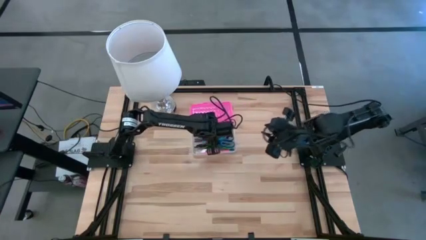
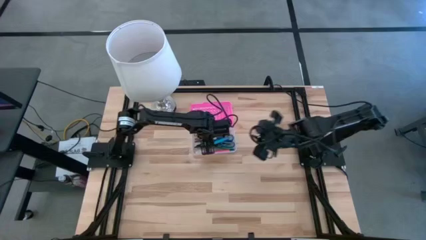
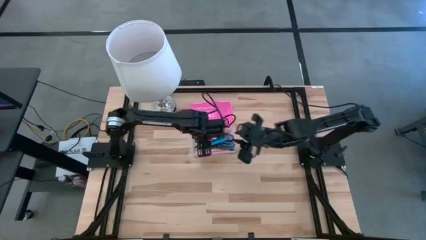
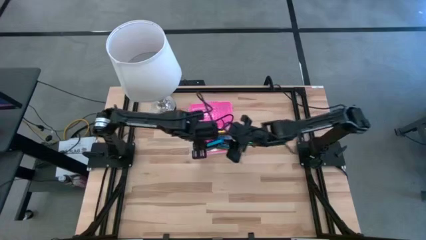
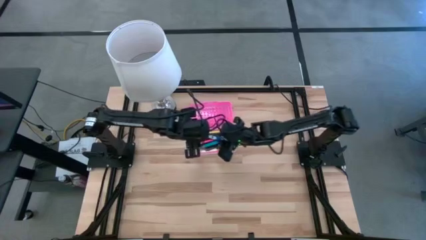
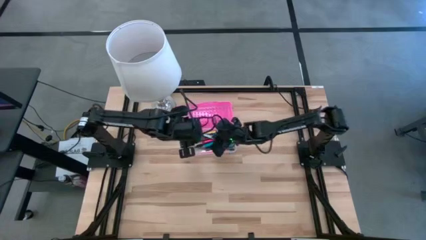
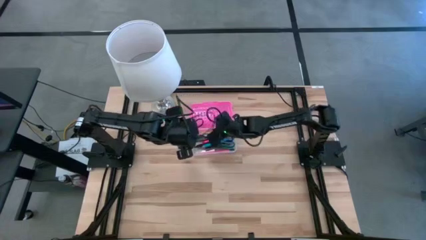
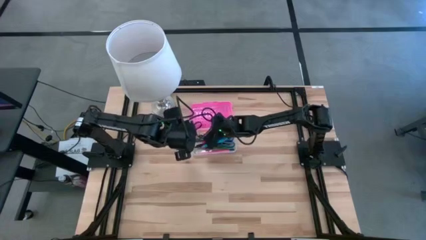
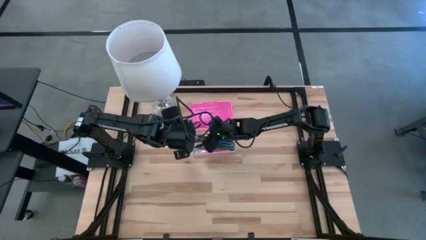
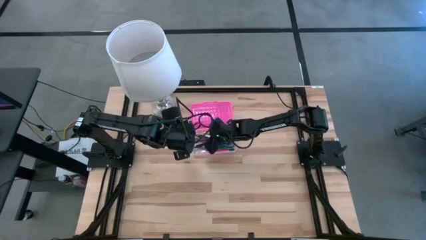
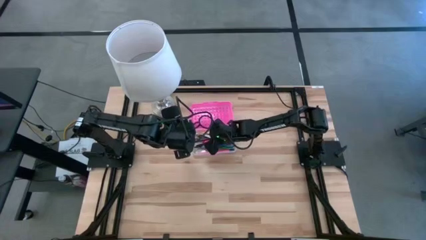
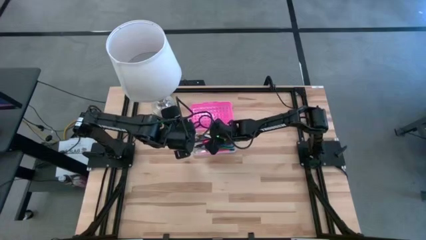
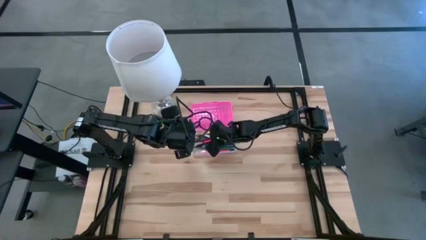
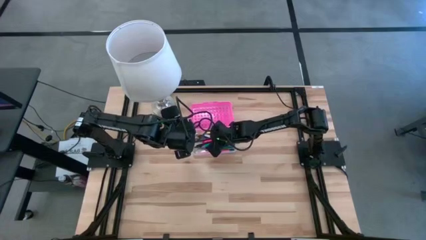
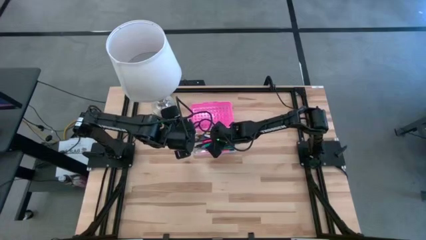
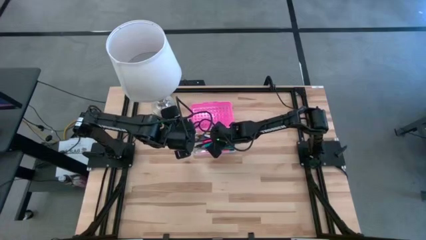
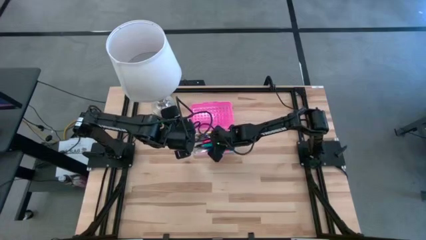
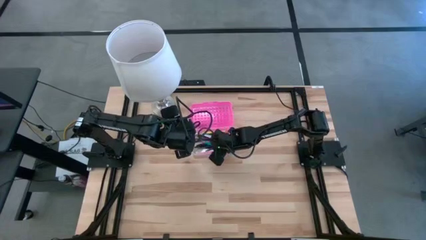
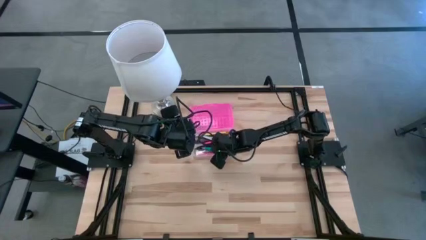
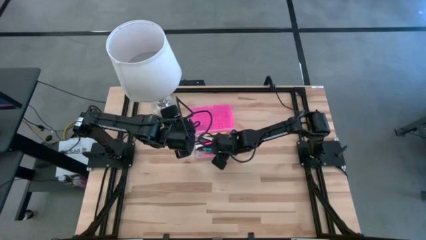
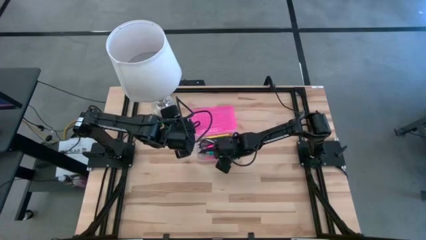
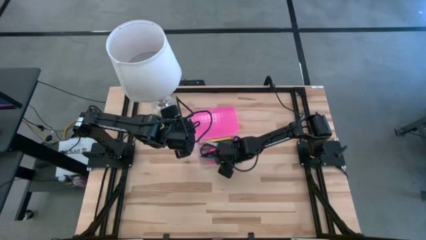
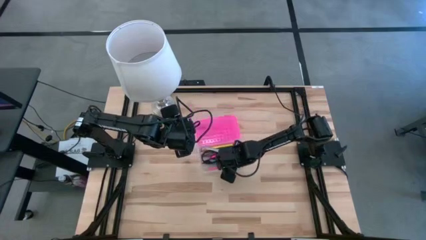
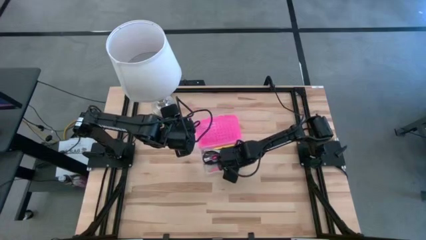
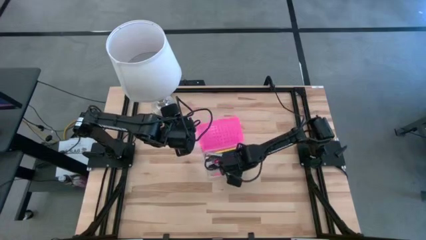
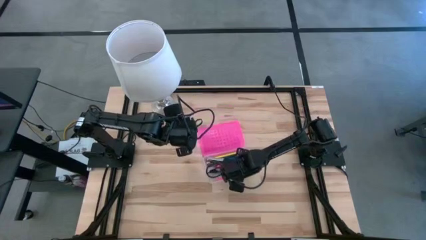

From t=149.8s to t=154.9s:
Task: Pick & place school supplies into a supply box
Move the supply box to the center of the table

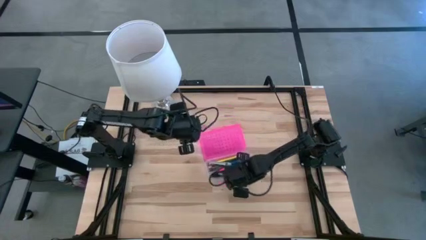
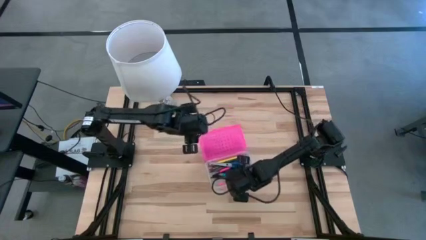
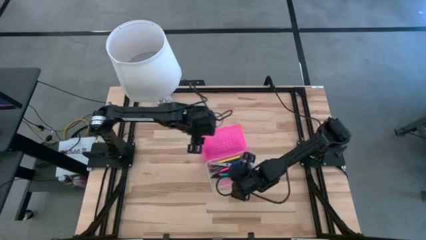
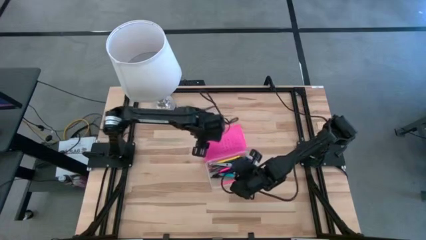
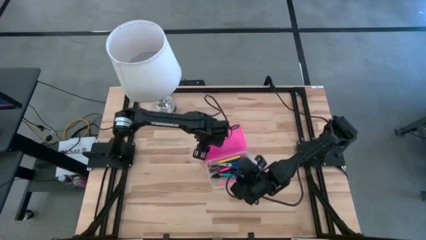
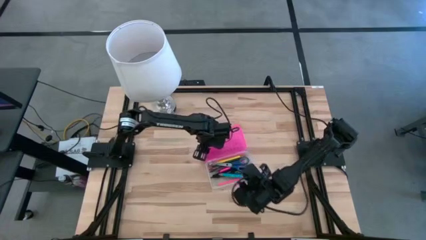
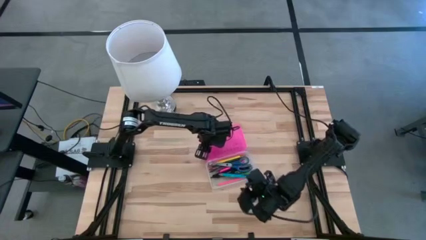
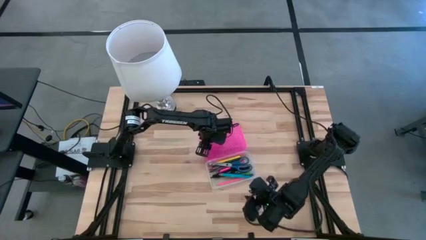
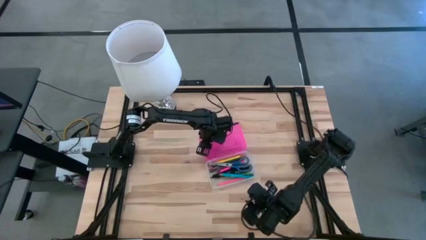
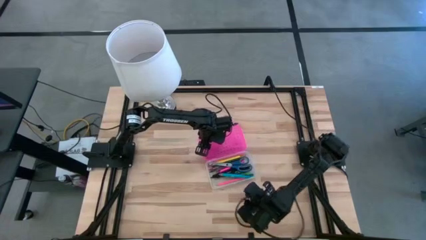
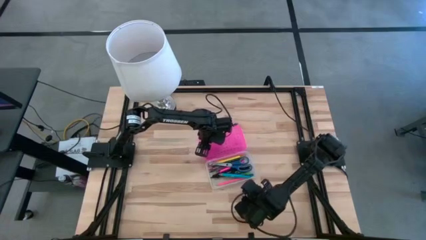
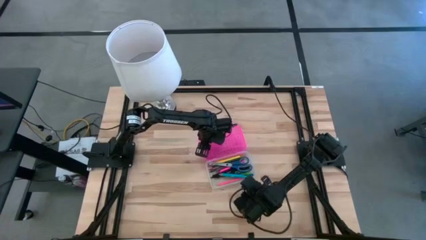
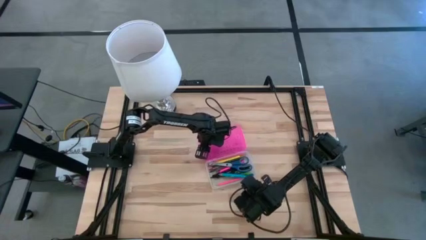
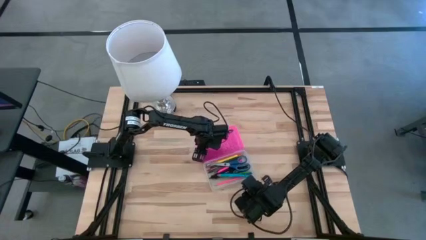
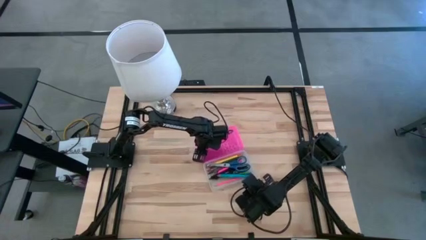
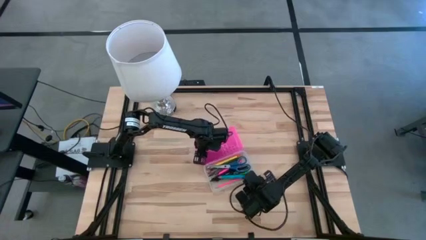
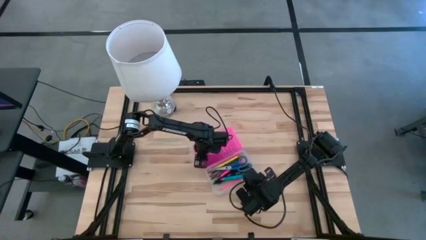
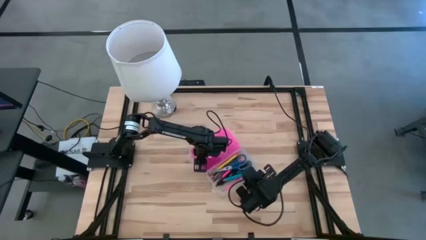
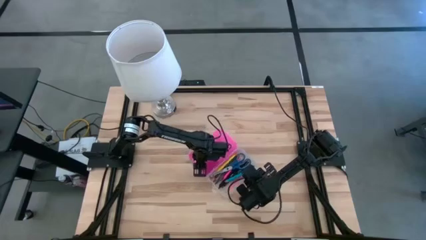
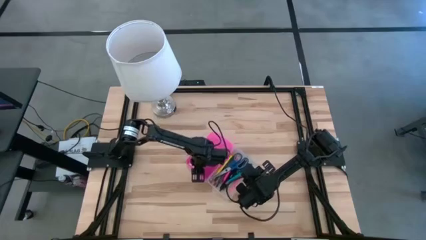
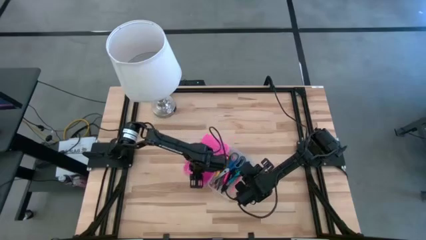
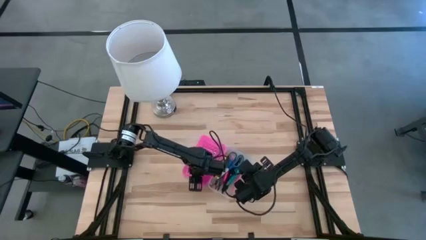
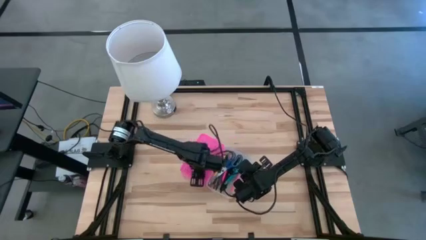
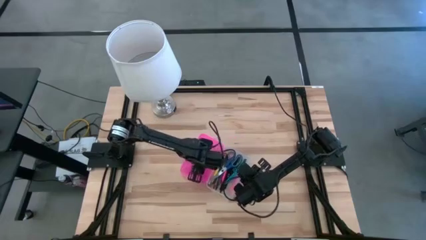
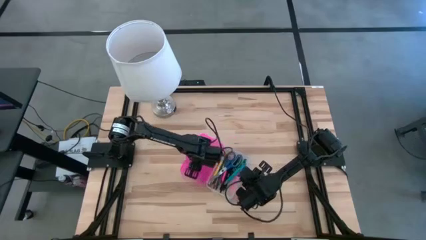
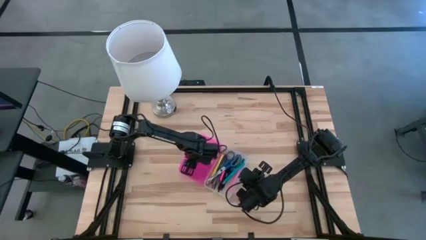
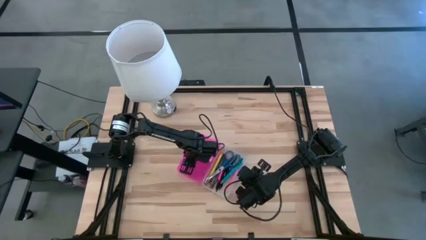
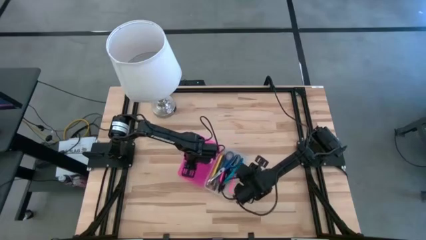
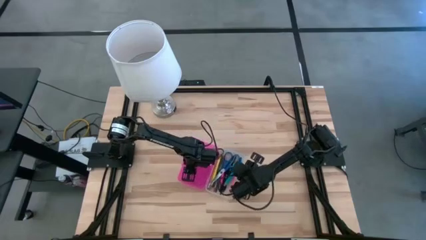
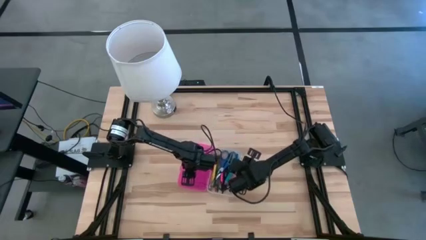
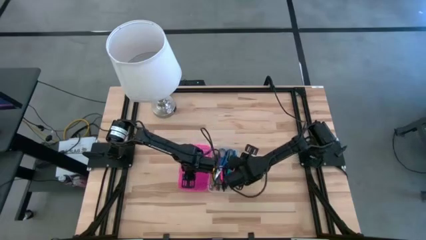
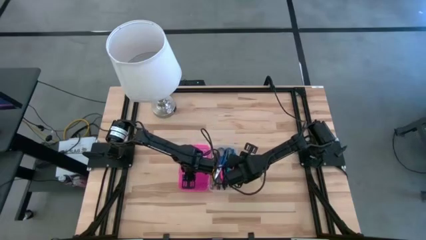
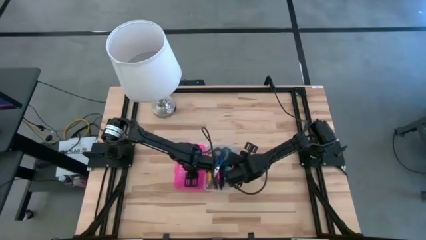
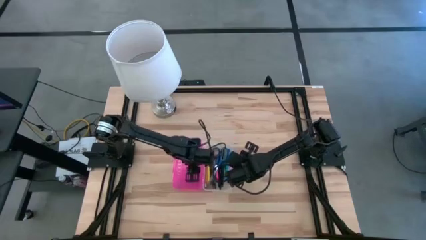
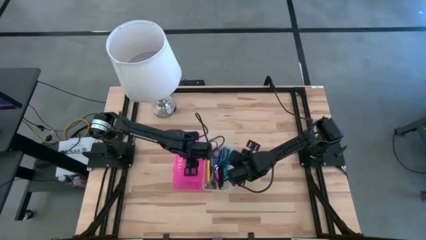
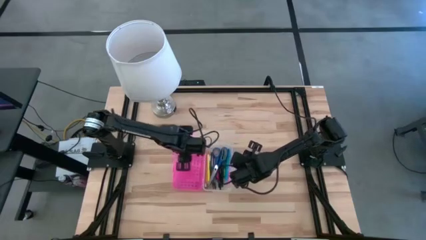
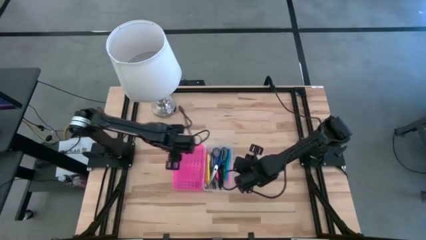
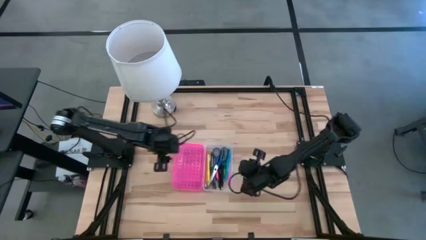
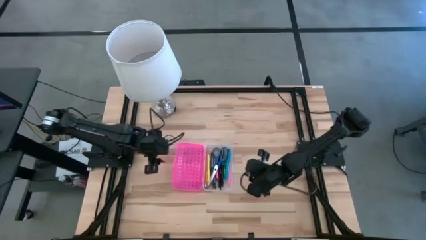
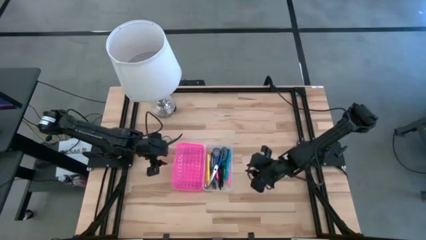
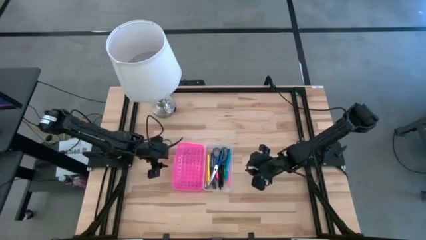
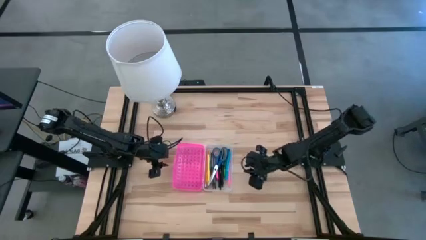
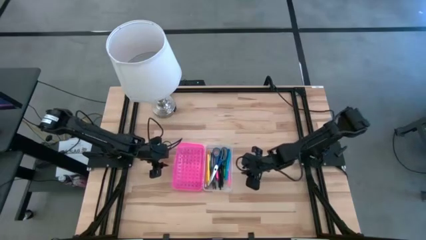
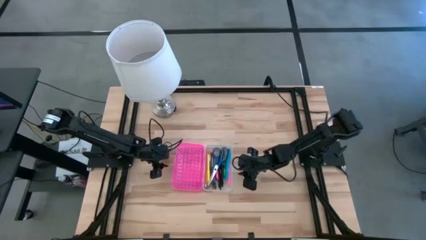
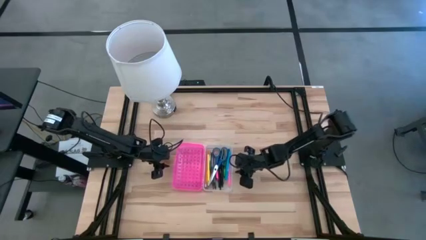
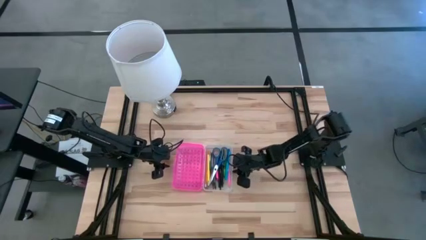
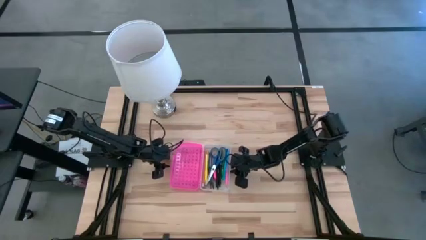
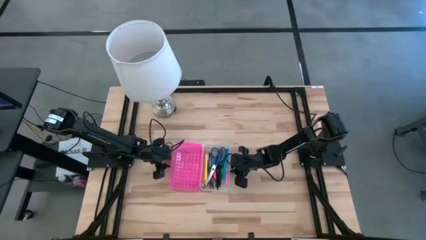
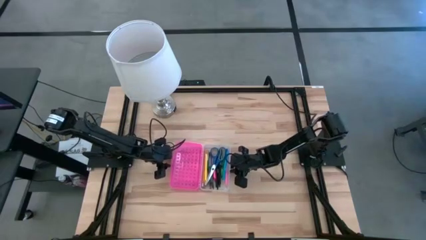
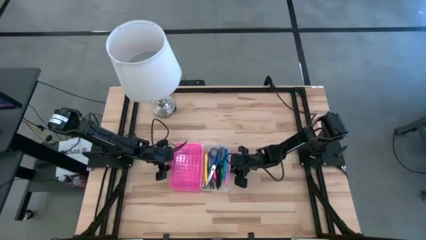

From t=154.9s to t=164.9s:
Close the supply box

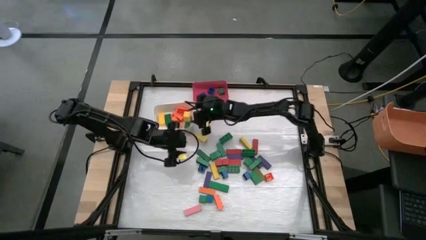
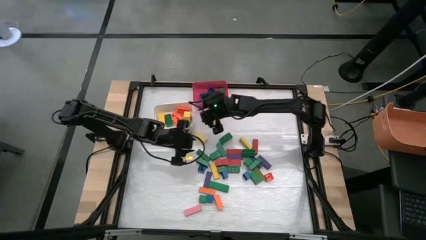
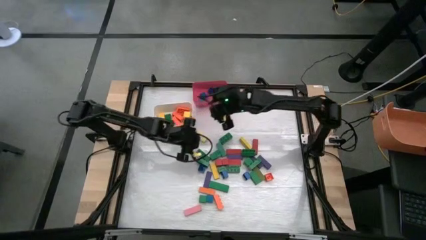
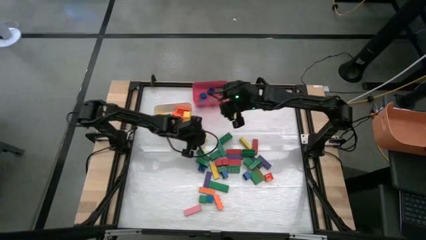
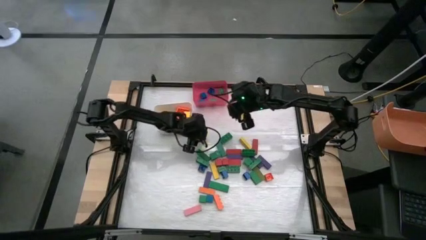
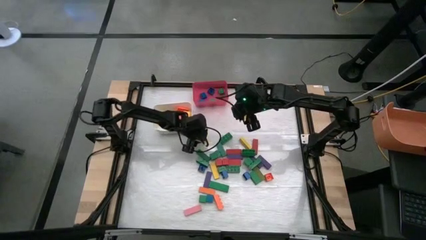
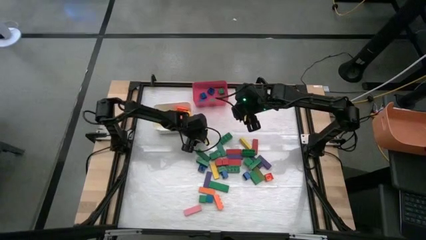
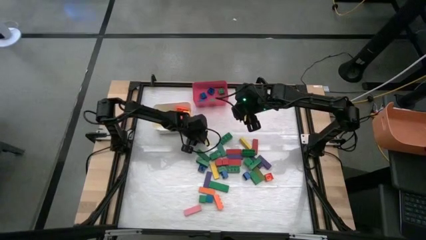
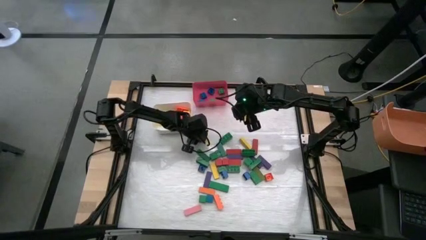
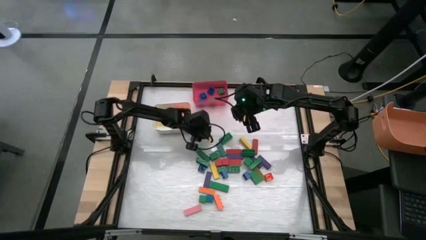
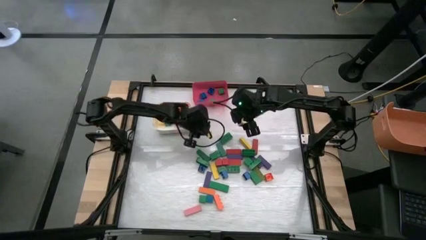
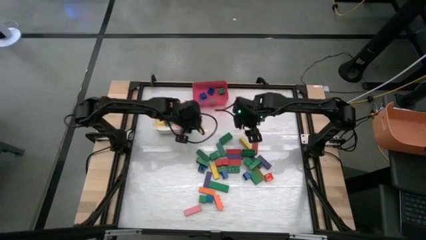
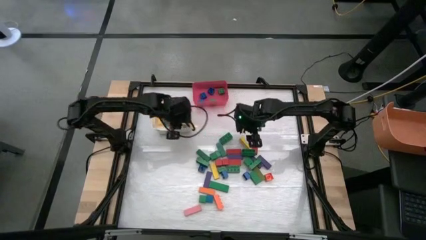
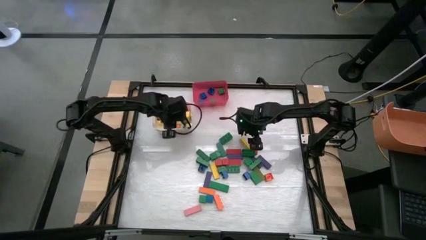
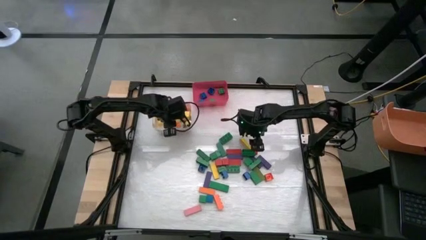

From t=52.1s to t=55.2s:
Task: Sort blocks by size
Put the large yellow wooden block into the white bin
